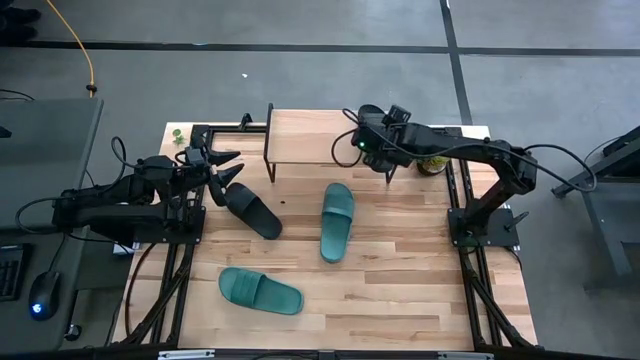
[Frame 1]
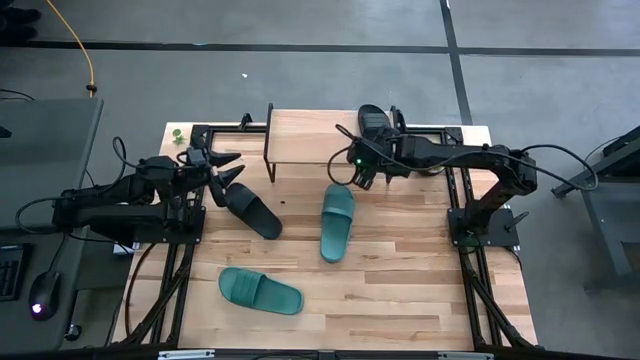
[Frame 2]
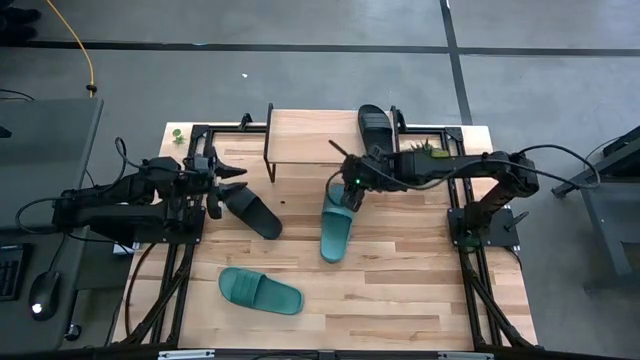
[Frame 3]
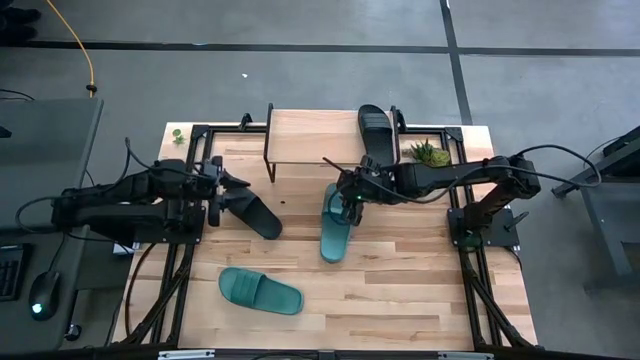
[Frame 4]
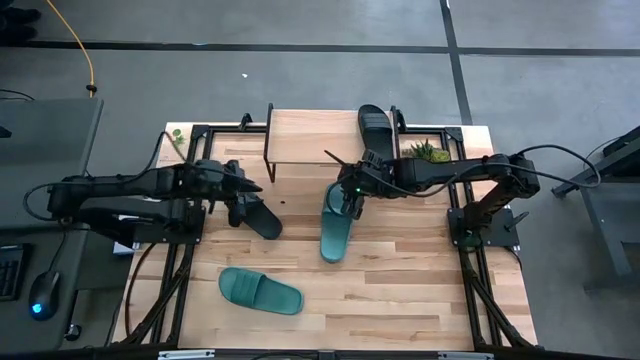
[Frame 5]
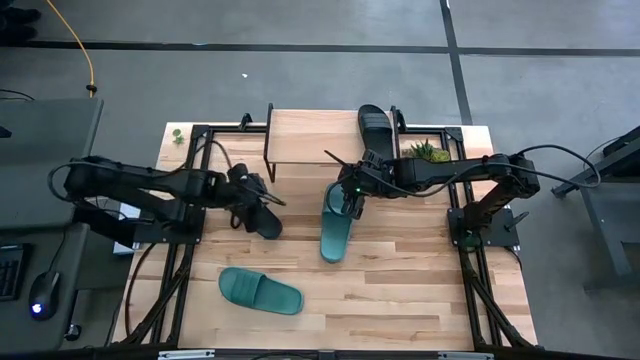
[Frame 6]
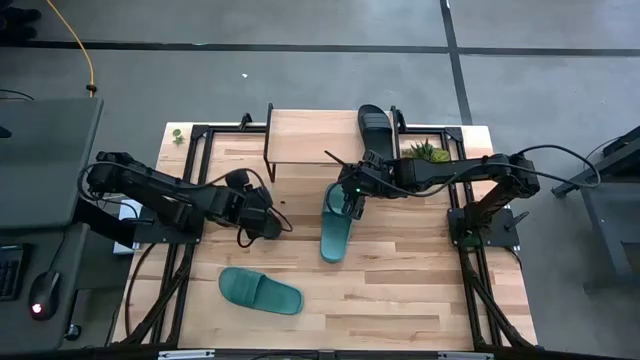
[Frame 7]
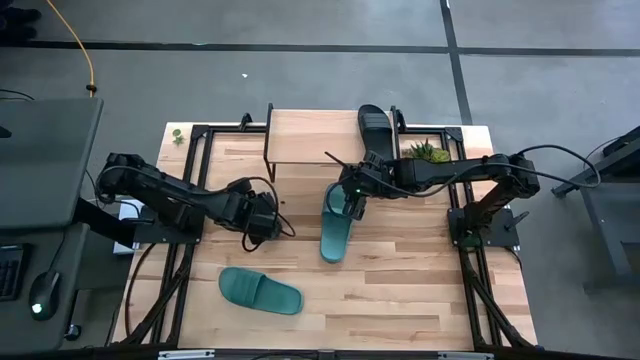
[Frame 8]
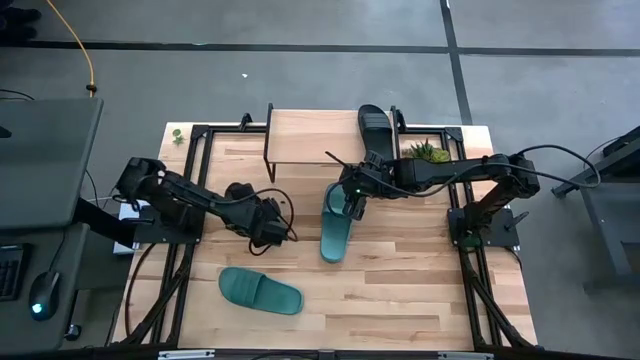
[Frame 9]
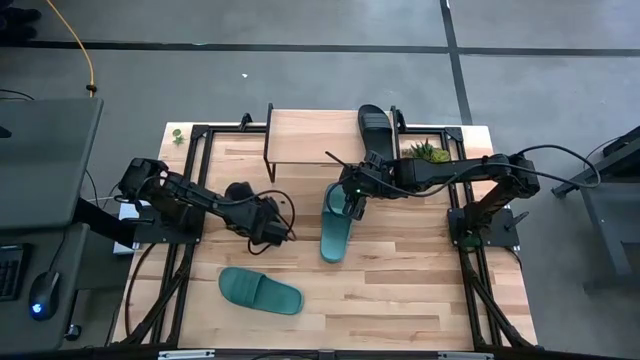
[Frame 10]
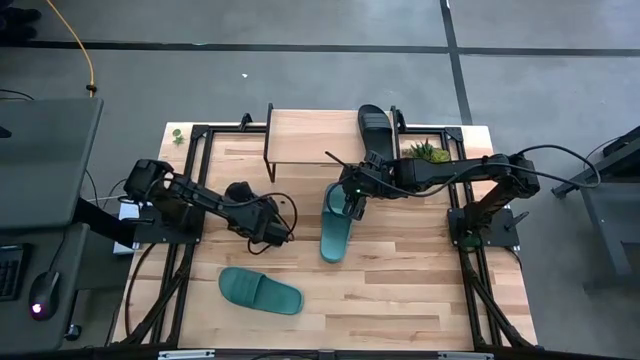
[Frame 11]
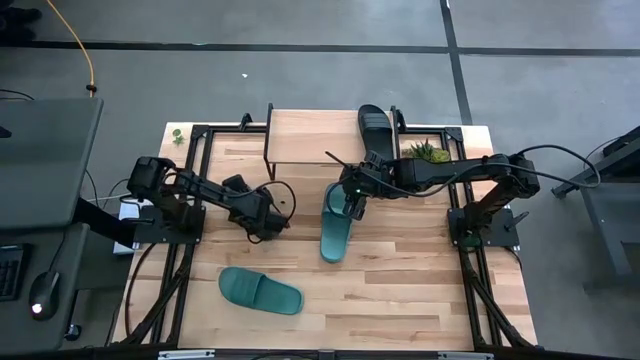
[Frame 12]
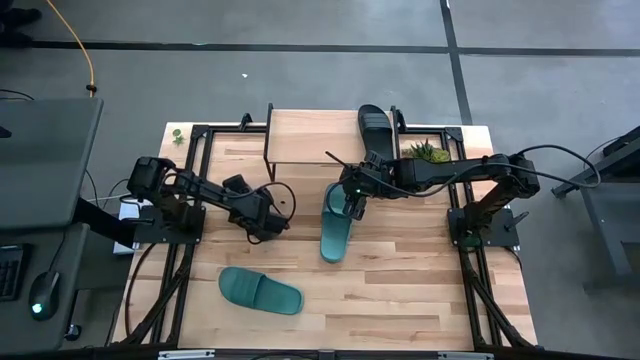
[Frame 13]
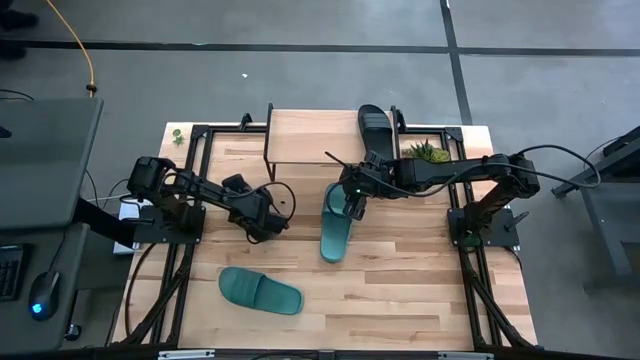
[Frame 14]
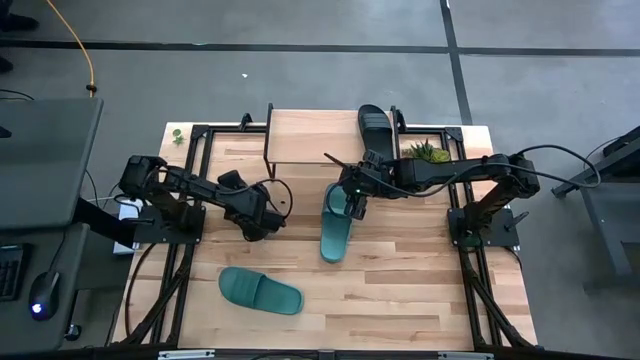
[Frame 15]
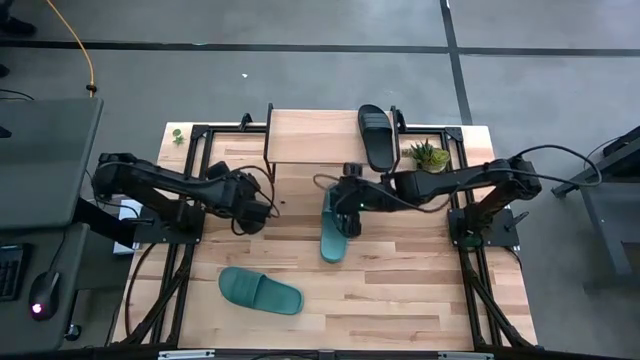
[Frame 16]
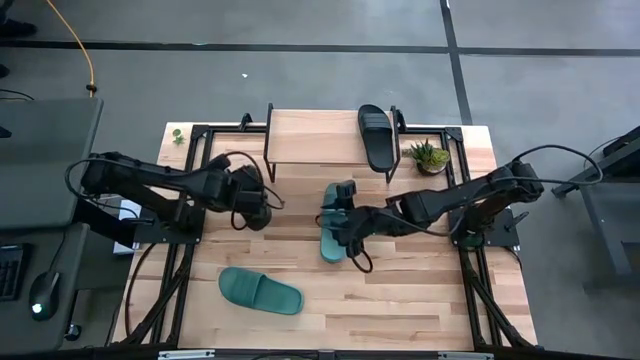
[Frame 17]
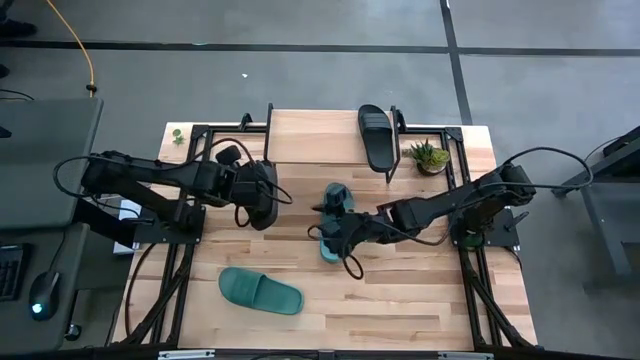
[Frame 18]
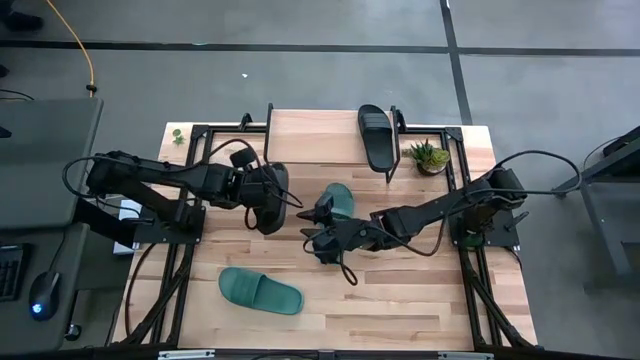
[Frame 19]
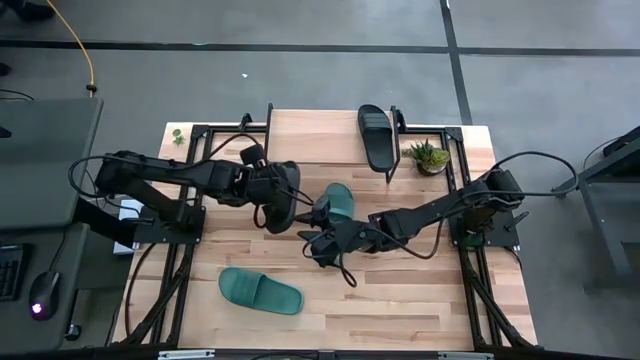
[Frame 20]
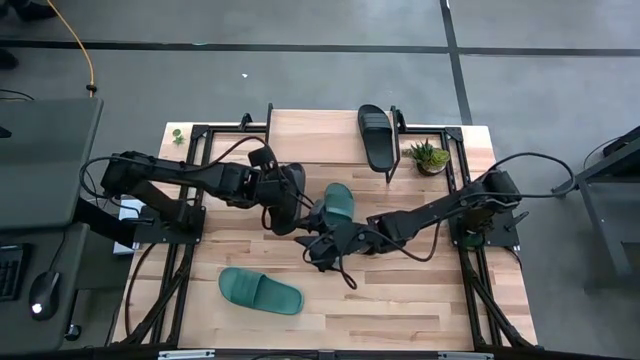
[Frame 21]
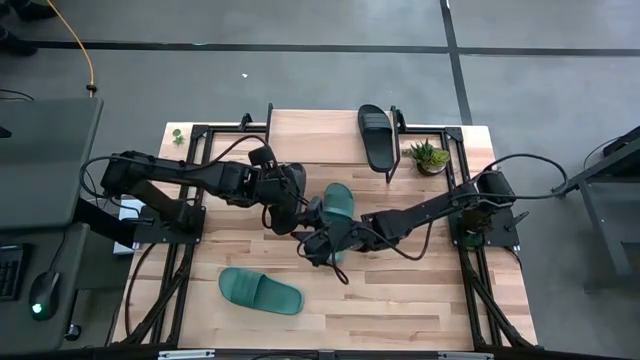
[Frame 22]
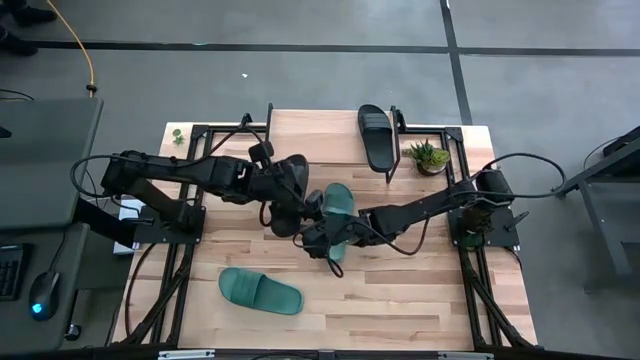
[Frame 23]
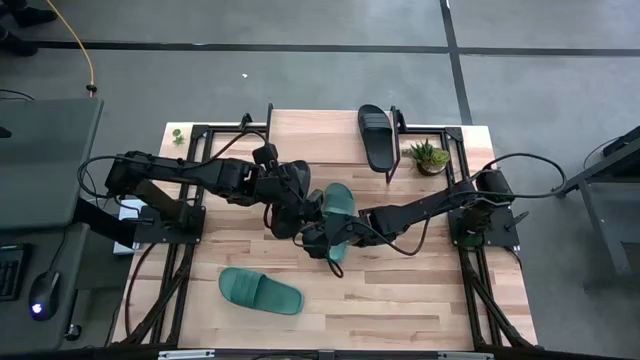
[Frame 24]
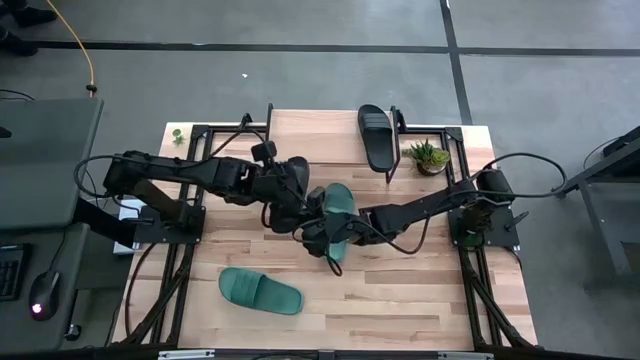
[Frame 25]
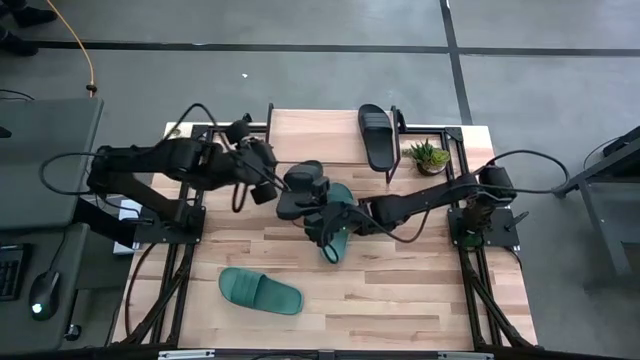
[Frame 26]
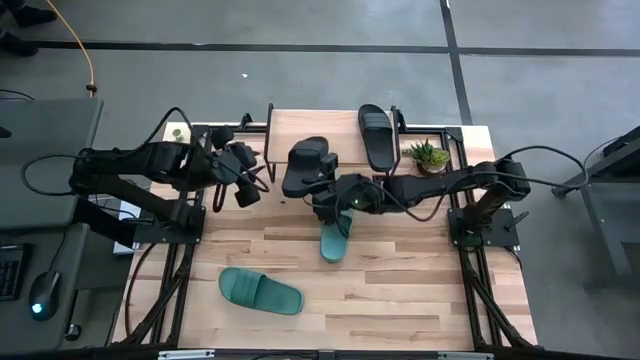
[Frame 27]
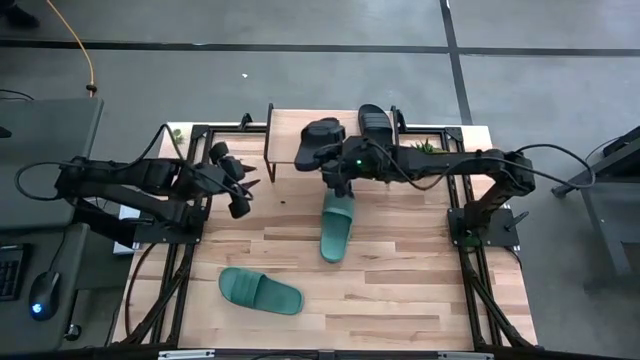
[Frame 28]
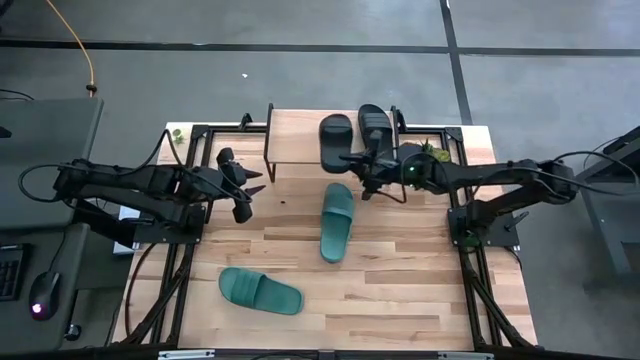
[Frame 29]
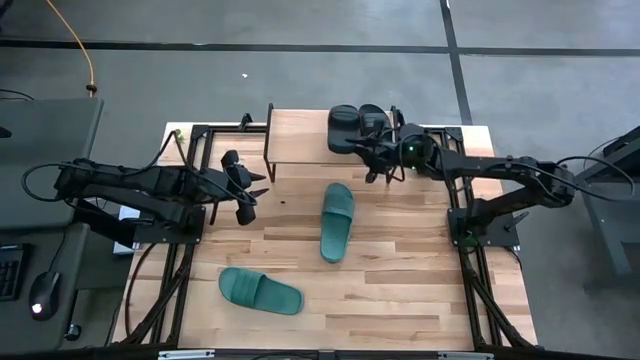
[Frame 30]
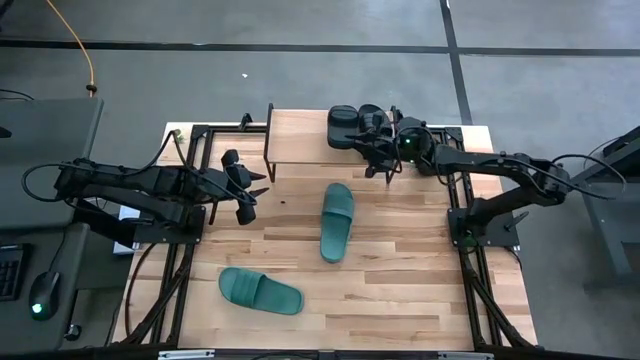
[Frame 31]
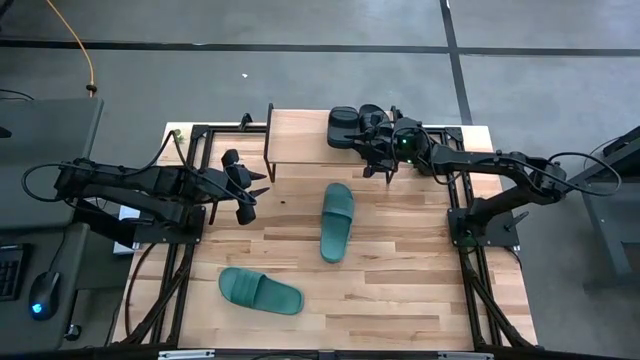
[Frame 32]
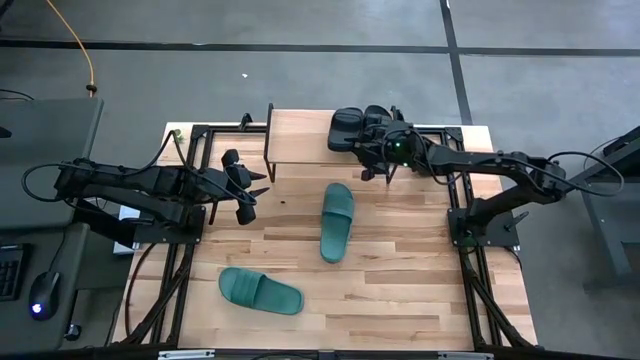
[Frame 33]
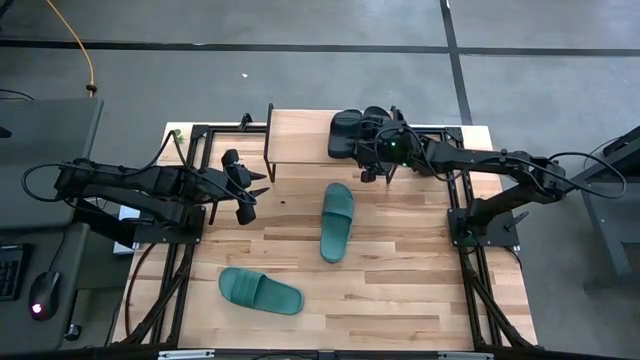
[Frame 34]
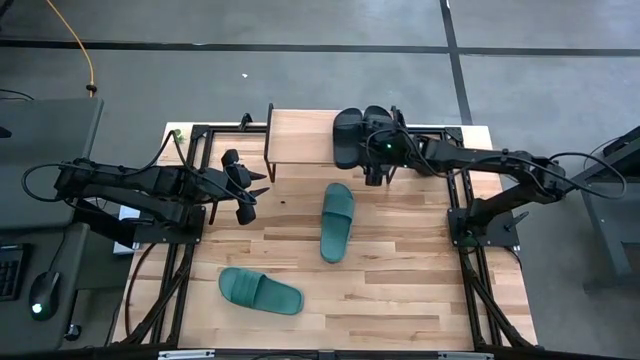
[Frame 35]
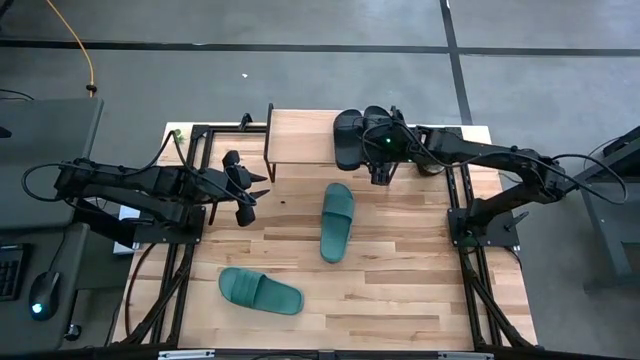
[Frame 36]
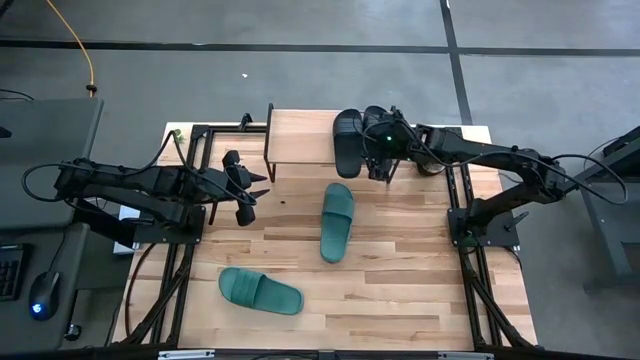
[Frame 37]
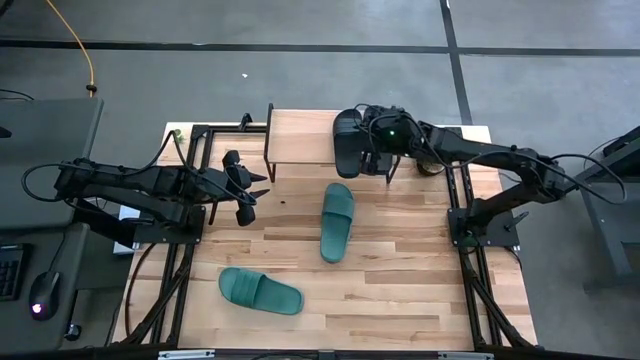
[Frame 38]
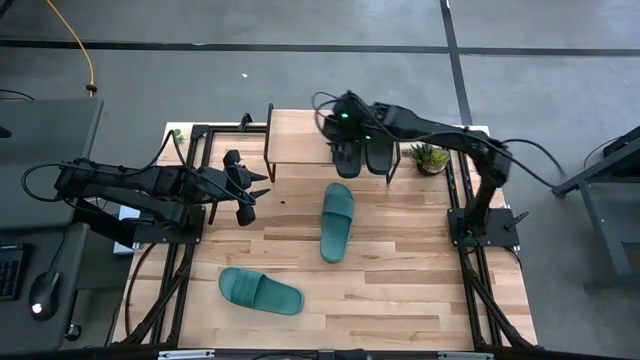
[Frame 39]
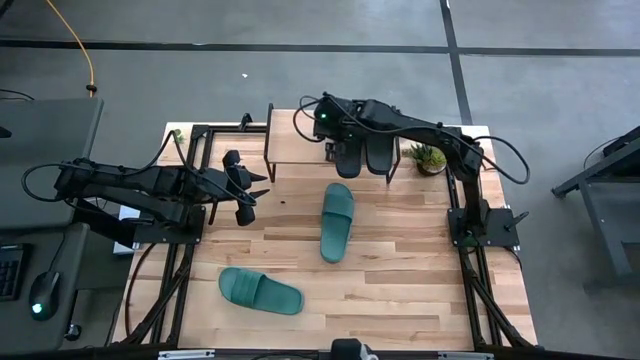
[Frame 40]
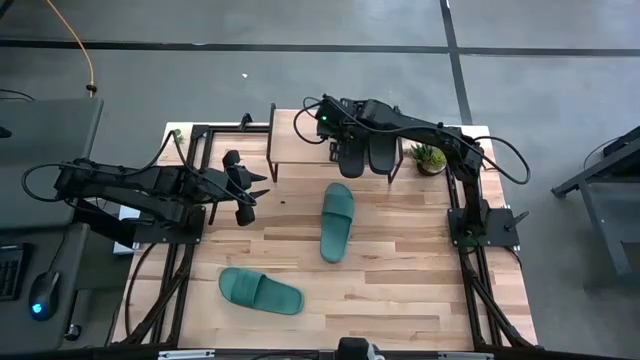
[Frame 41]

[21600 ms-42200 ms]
Task: Pick and place slides into the shelf
Put the black slide on the shelf
